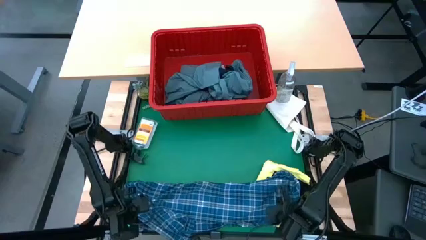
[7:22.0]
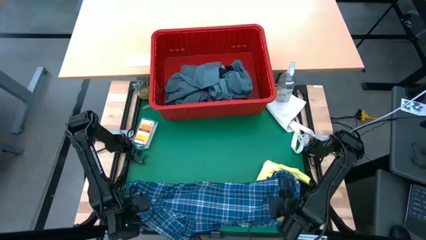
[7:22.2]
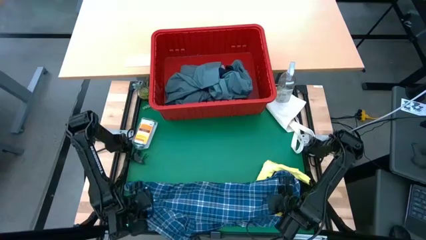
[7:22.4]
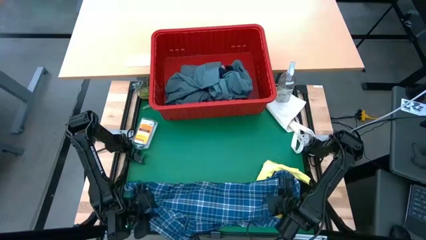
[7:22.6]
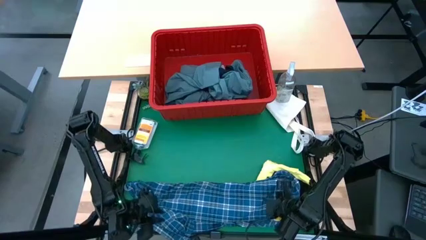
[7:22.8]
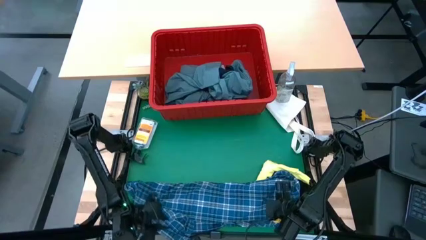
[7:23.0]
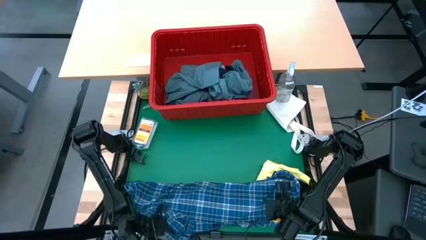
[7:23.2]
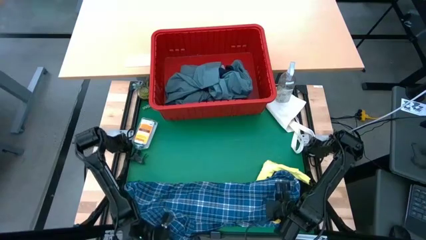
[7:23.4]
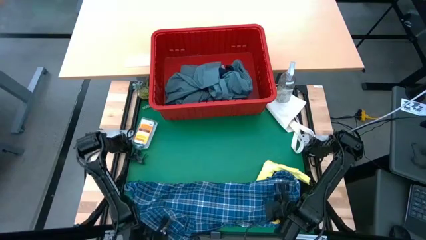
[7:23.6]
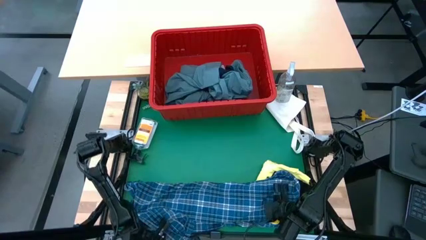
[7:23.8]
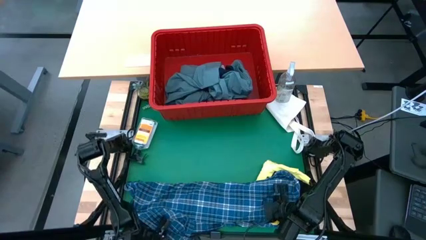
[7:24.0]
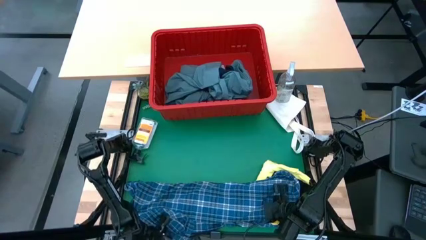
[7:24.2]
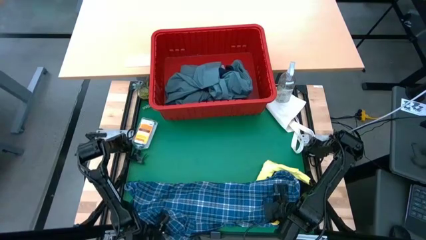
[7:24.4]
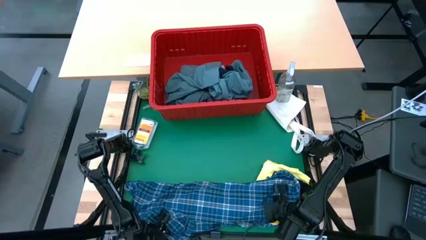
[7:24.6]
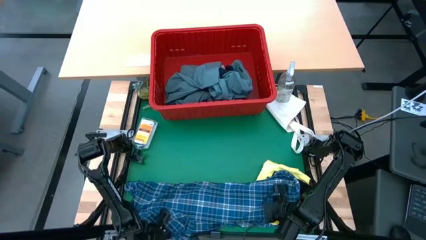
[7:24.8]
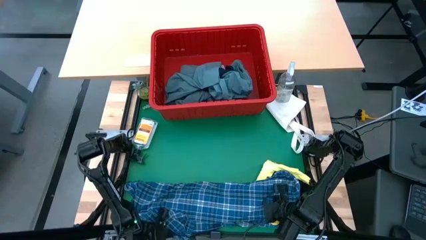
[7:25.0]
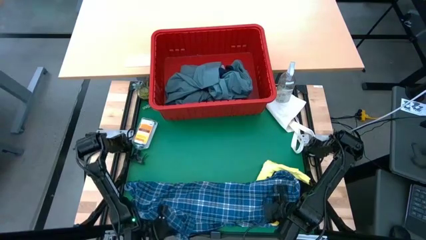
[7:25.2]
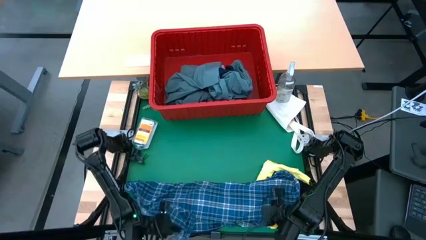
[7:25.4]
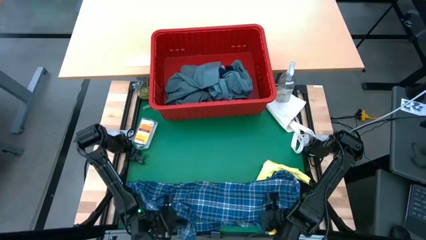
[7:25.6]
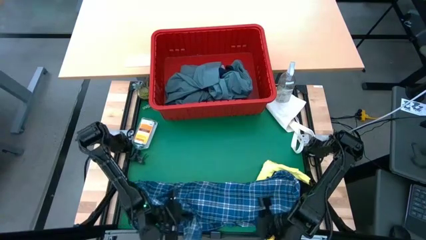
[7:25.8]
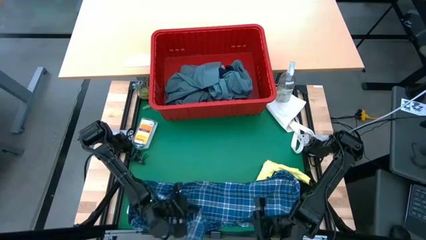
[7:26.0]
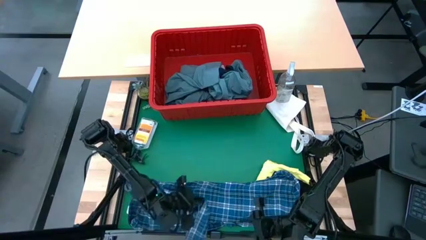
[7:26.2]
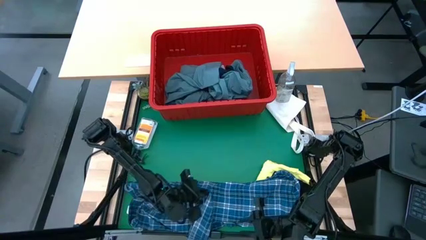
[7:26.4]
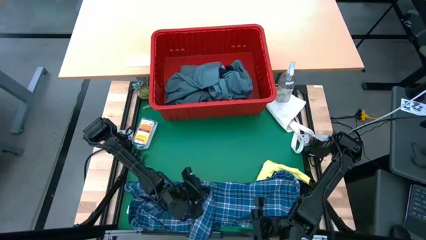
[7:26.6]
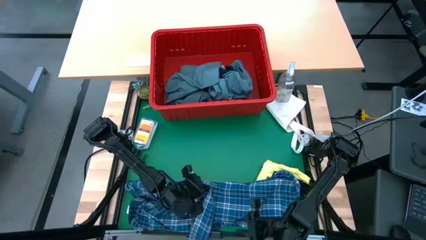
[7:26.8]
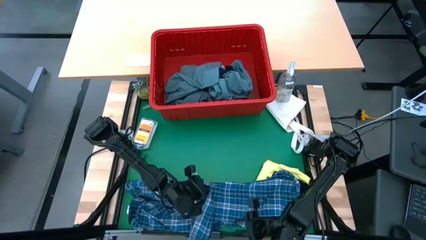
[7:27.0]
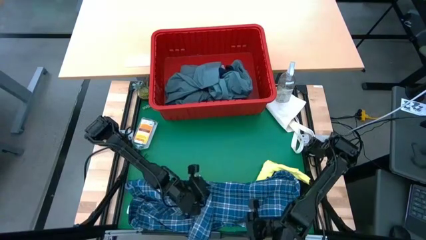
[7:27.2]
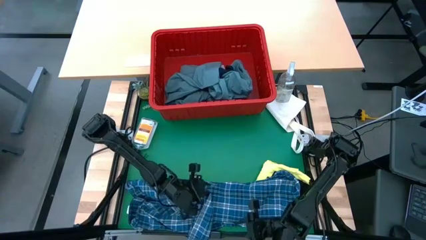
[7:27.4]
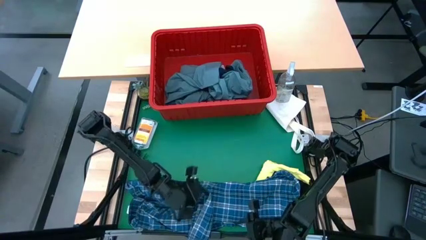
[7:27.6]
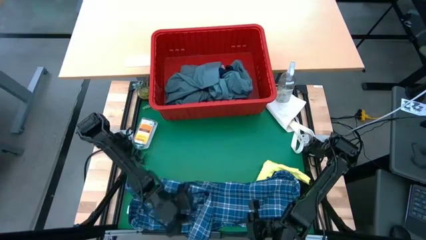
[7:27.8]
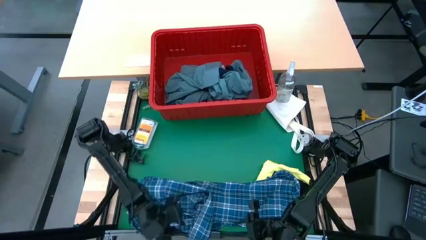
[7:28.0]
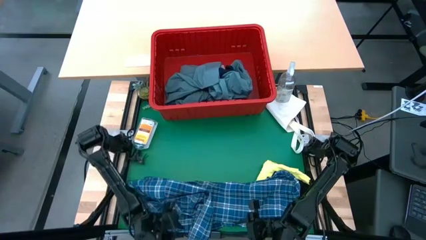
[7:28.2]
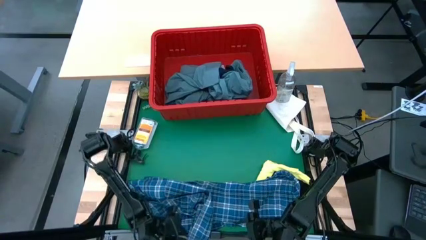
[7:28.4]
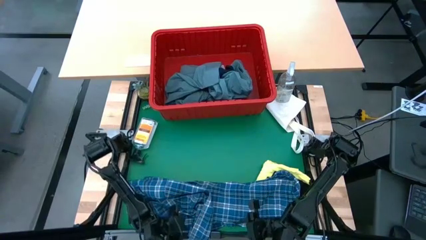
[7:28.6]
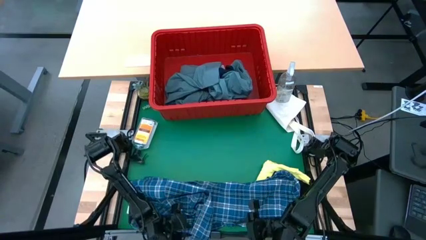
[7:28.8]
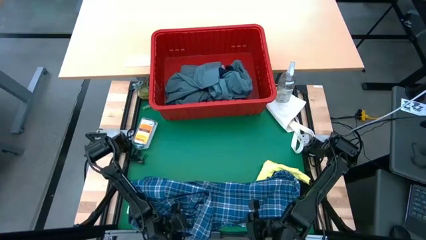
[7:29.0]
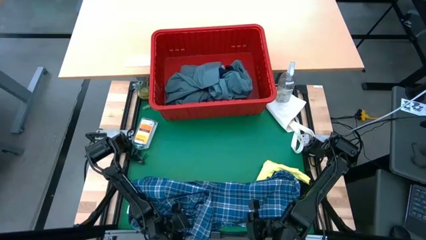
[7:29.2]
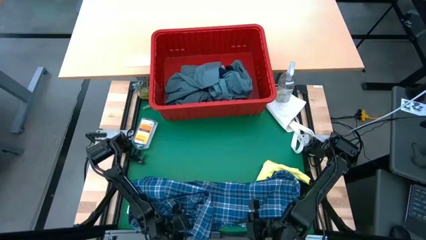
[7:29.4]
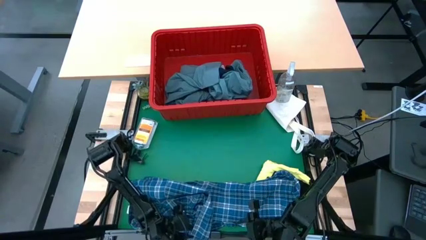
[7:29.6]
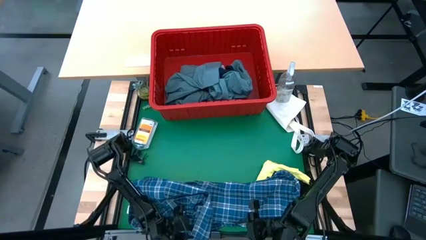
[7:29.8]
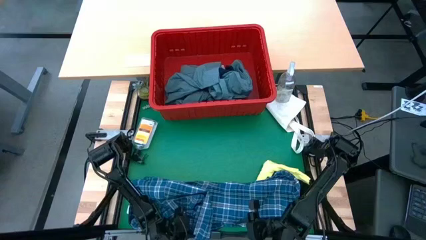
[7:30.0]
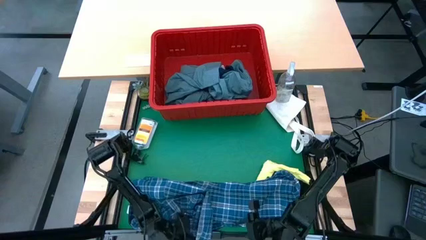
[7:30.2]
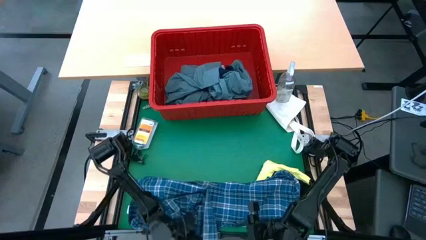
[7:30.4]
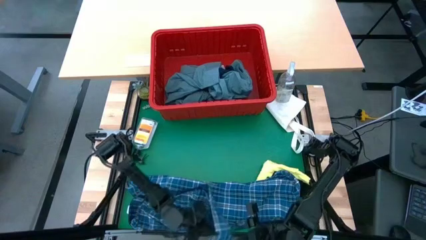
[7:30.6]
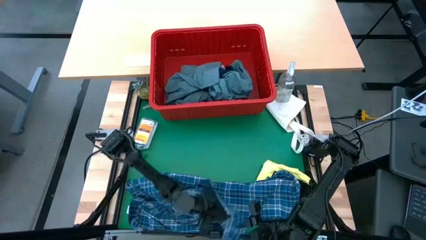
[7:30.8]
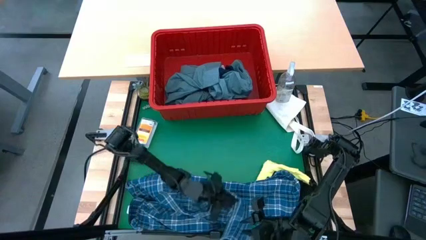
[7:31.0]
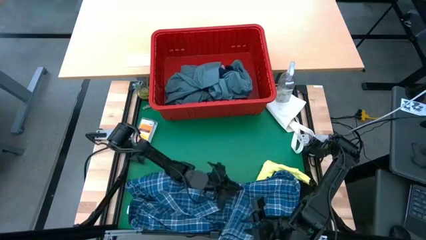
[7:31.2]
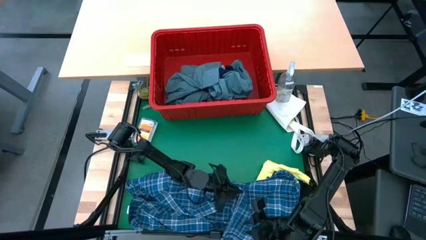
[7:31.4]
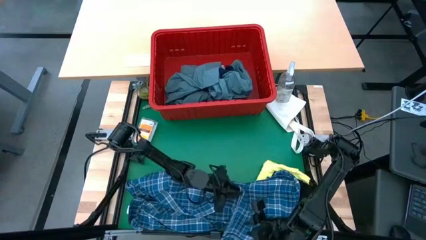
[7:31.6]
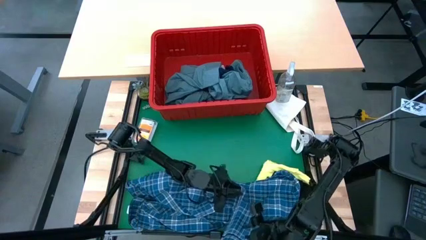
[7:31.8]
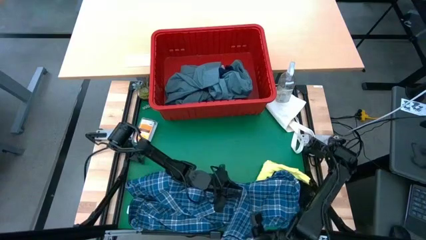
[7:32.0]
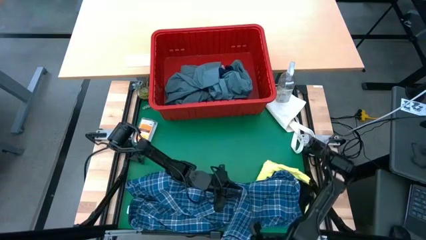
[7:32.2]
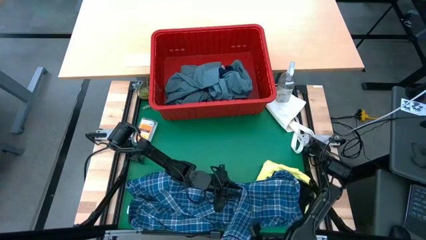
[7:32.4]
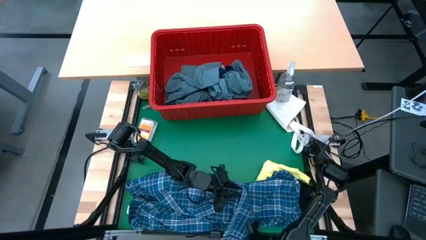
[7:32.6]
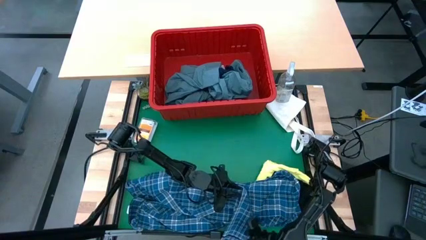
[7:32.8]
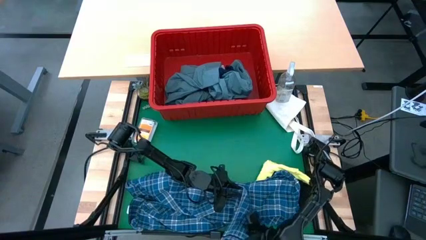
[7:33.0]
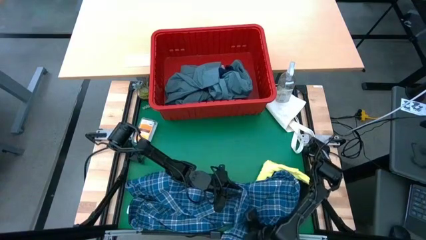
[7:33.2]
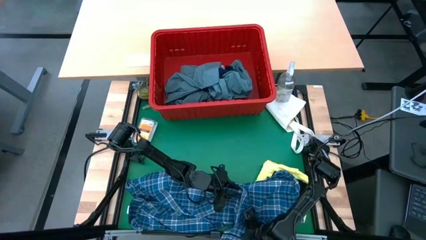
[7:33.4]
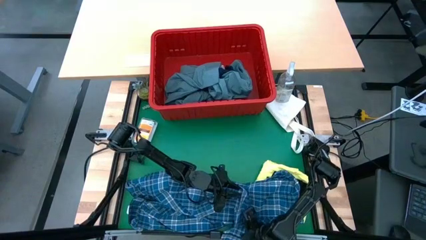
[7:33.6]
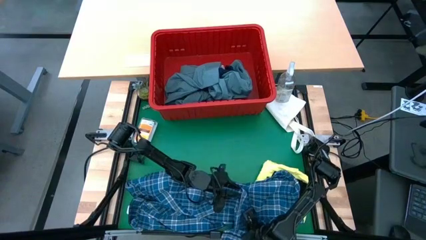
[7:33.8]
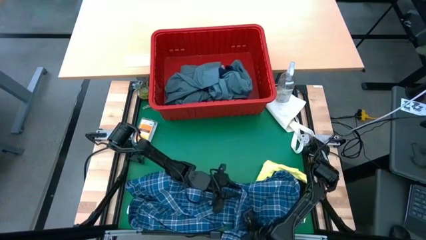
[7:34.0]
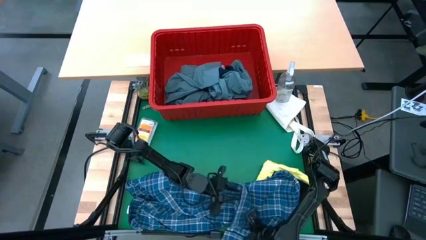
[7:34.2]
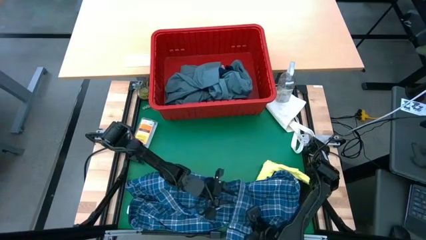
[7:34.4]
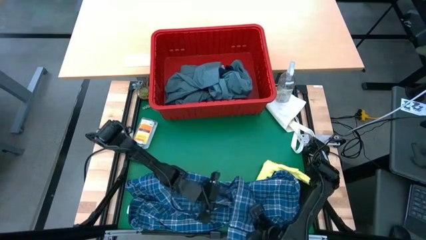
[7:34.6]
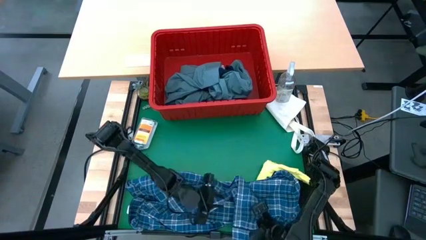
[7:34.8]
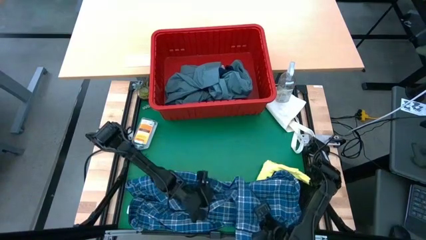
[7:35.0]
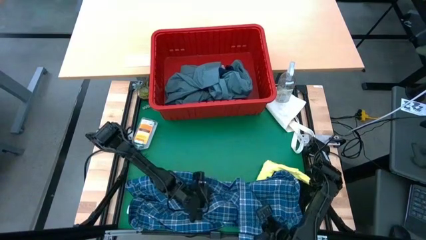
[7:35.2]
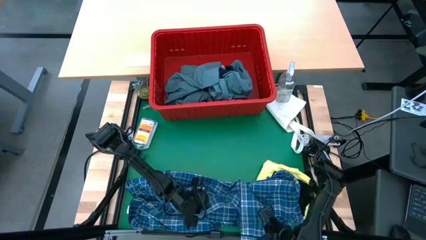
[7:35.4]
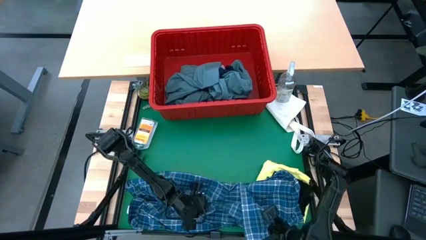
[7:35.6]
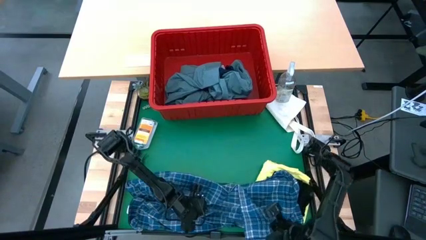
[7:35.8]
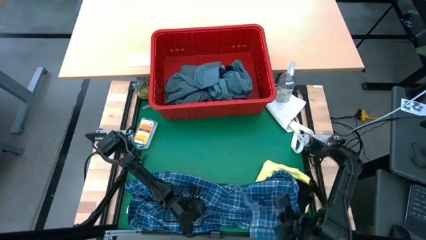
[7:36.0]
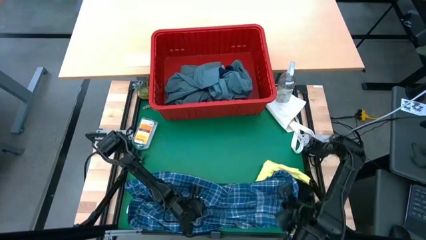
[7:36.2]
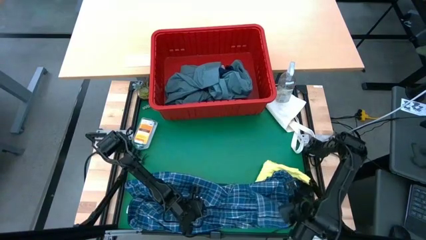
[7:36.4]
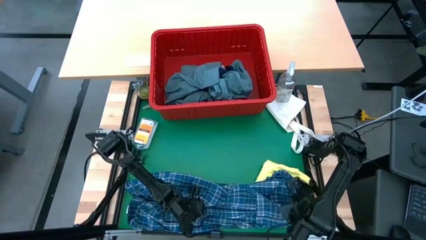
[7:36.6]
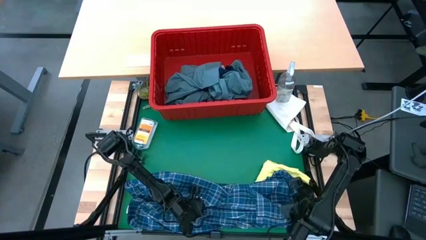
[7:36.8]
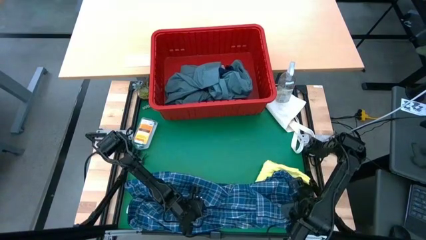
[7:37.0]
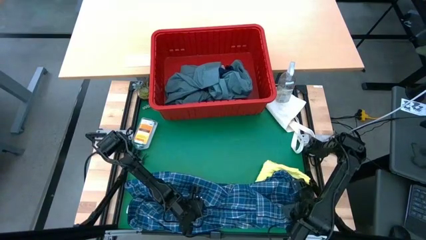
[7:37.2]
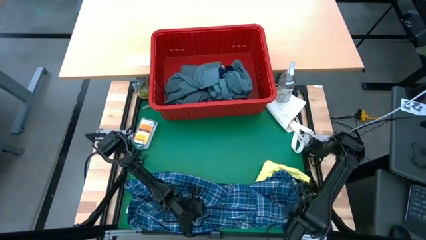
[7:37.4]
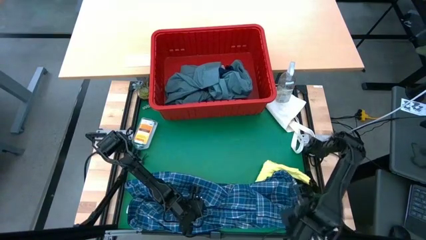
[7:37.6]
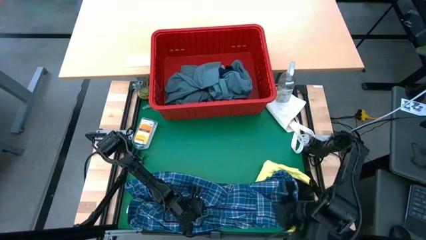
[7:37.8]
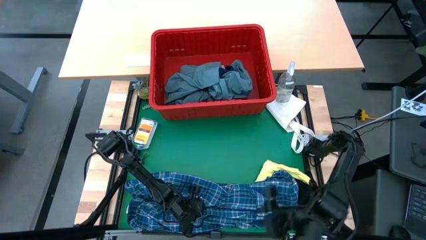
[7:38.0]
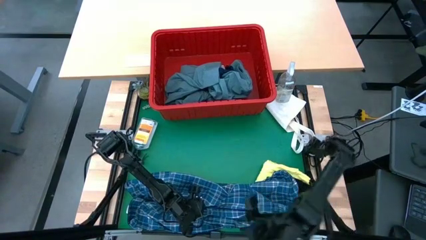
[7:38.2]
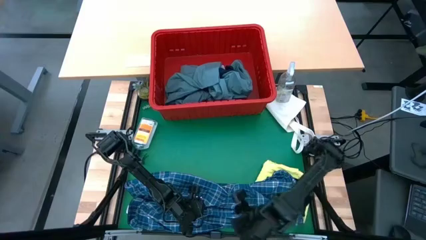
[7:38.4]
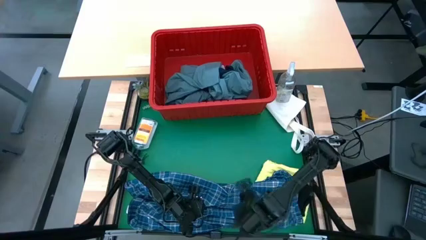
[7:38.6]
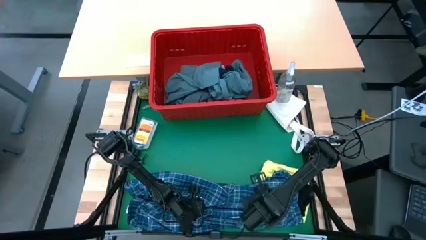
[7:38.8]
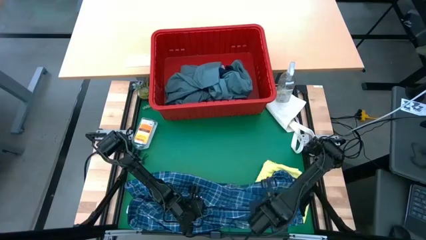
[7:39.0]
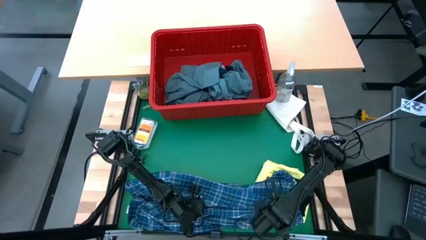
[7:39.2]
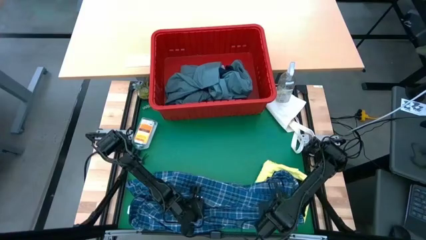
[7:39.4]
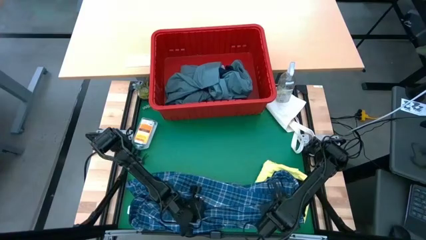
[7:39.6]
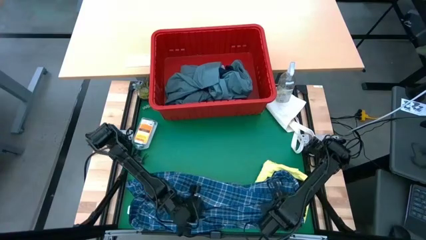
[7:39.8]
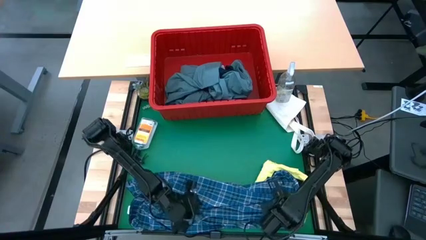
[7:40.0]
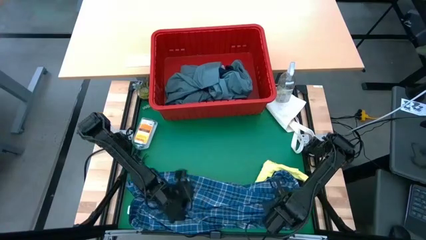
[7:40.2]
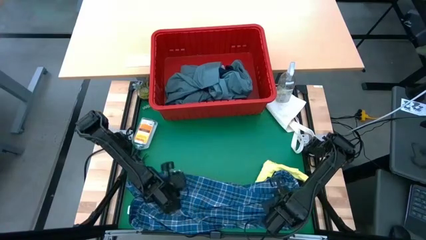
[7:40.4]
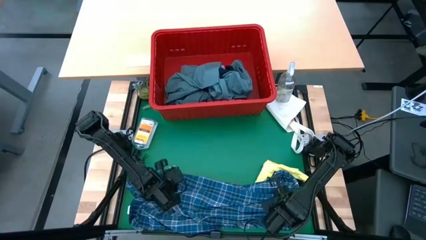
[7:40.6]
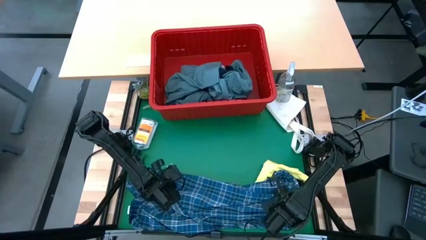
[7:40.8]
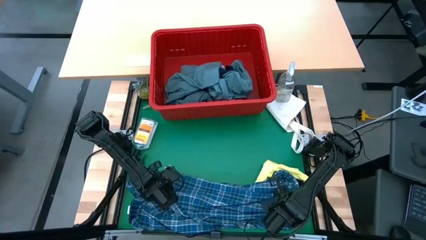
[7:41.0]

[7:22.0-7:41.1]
Task: Fold Laundry from Bin
Fold the blue shirt
